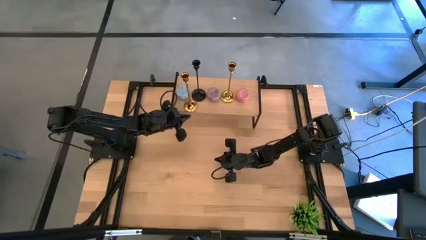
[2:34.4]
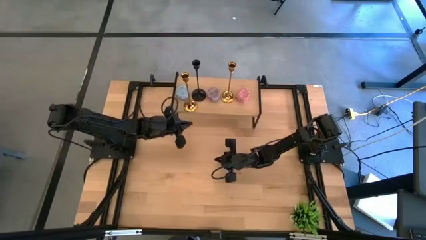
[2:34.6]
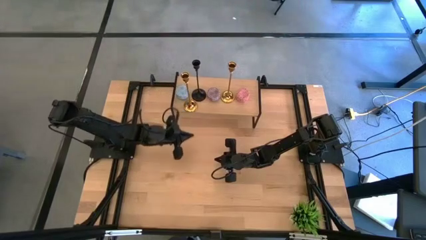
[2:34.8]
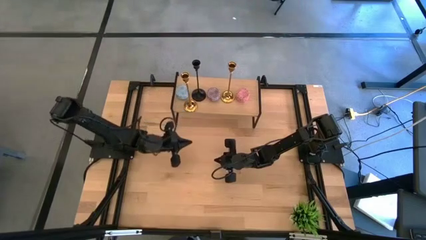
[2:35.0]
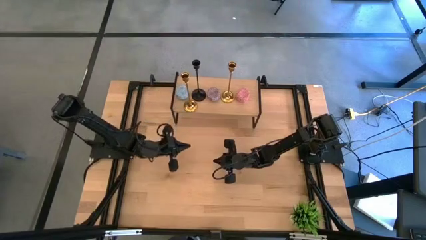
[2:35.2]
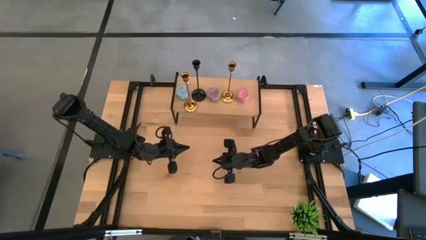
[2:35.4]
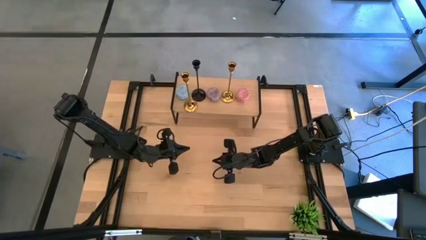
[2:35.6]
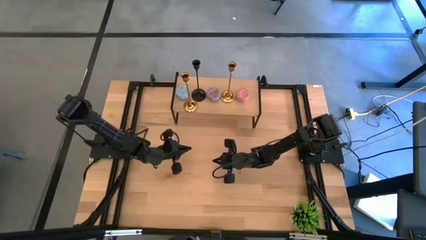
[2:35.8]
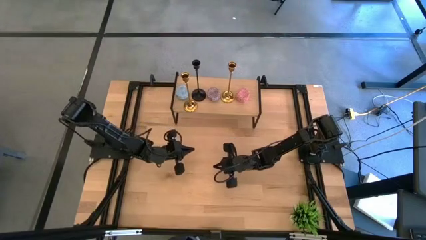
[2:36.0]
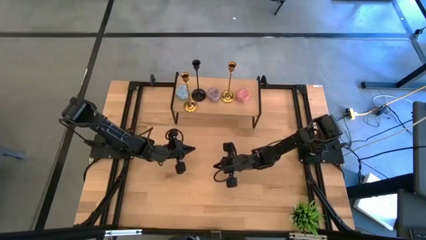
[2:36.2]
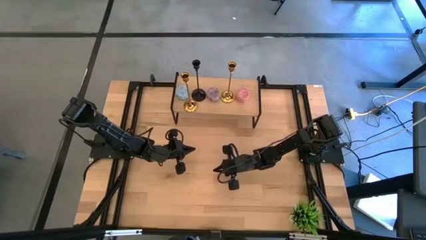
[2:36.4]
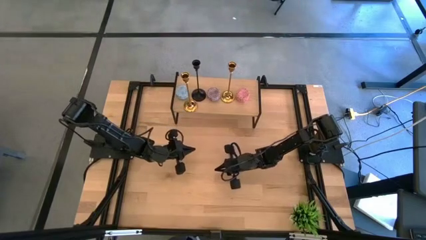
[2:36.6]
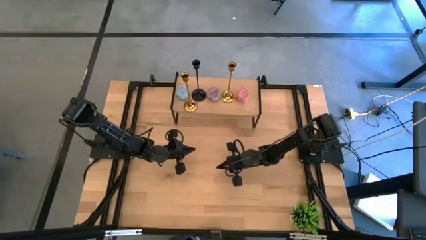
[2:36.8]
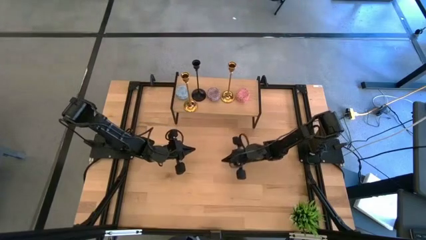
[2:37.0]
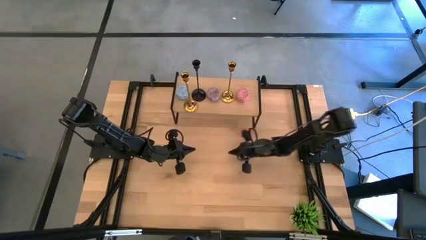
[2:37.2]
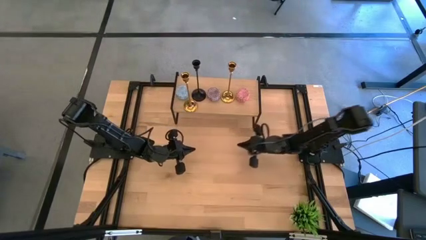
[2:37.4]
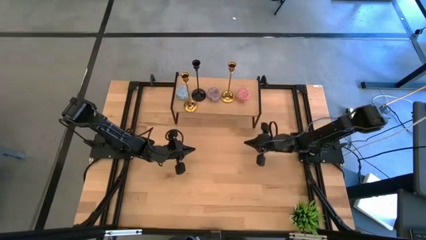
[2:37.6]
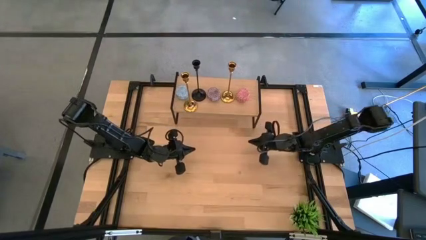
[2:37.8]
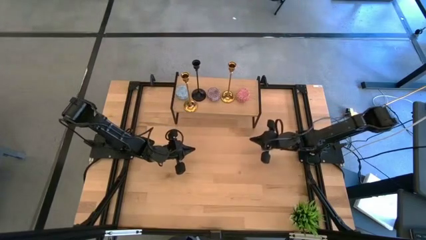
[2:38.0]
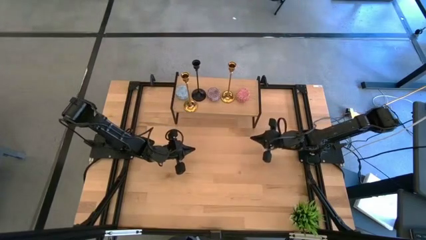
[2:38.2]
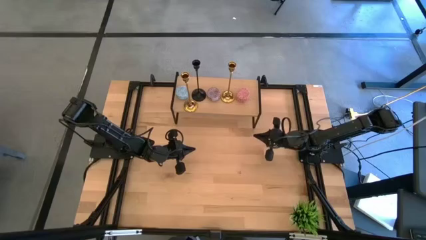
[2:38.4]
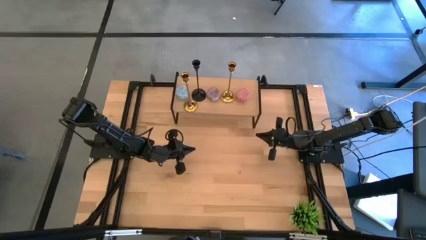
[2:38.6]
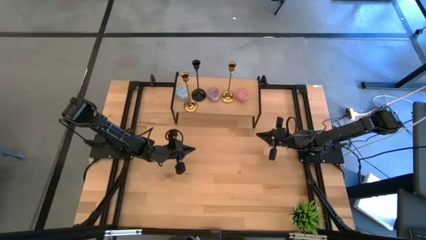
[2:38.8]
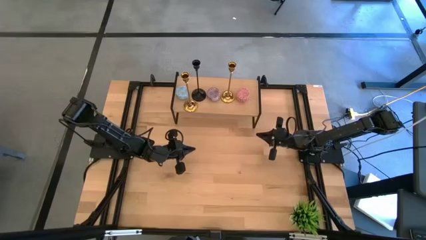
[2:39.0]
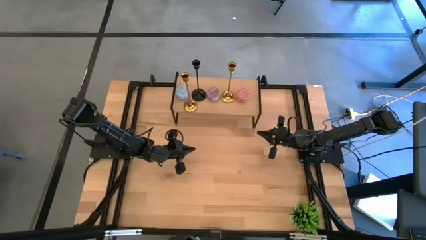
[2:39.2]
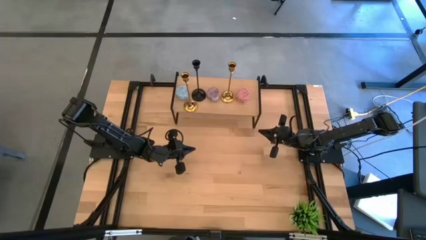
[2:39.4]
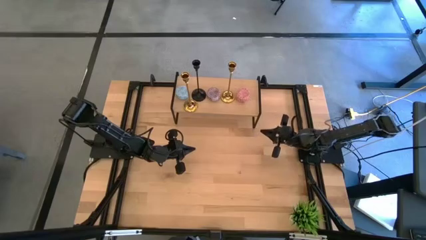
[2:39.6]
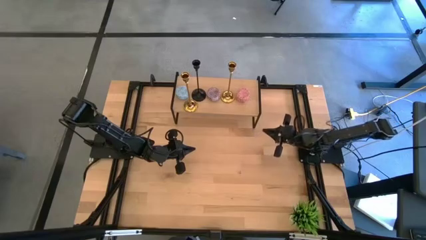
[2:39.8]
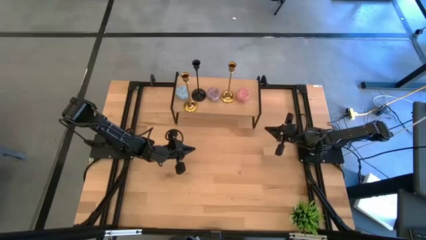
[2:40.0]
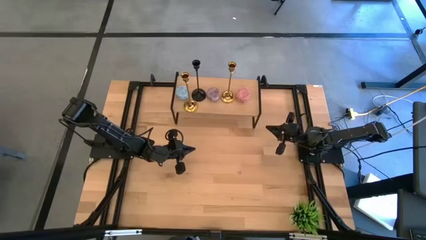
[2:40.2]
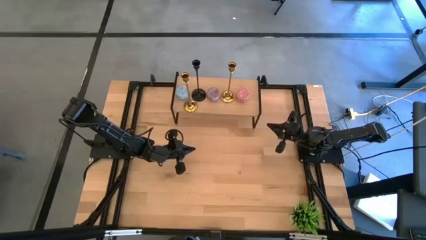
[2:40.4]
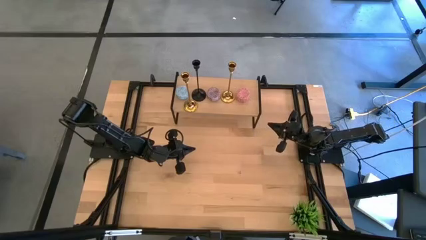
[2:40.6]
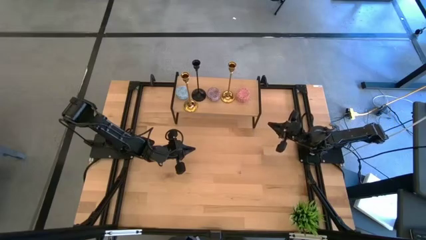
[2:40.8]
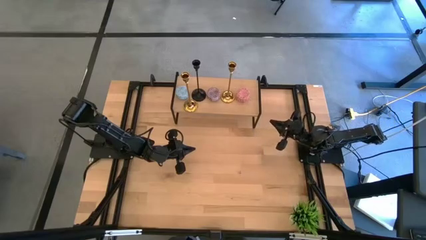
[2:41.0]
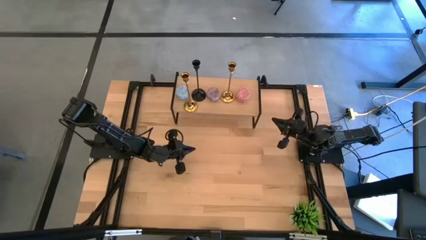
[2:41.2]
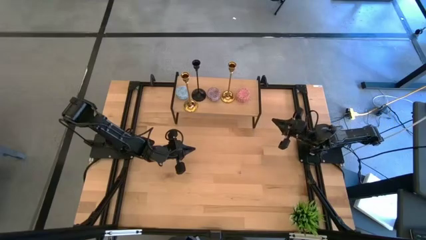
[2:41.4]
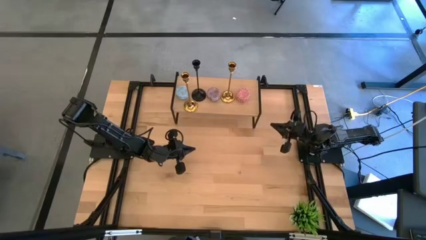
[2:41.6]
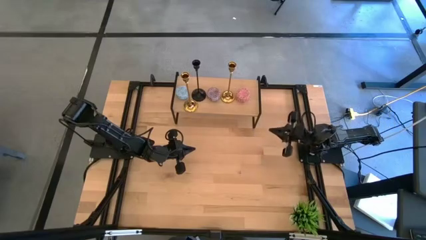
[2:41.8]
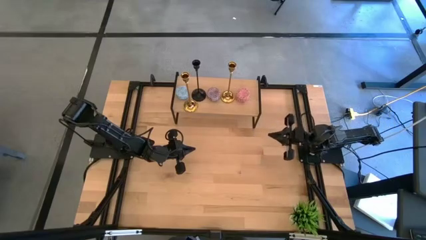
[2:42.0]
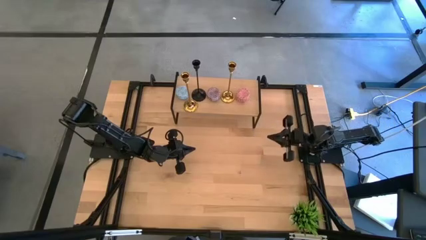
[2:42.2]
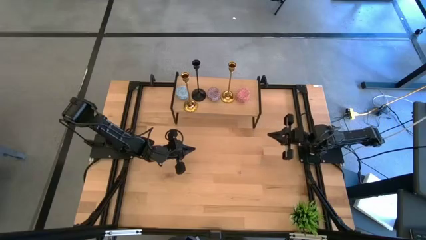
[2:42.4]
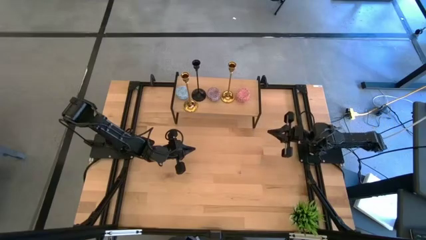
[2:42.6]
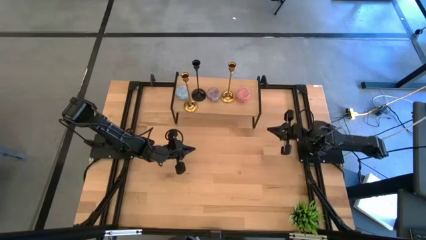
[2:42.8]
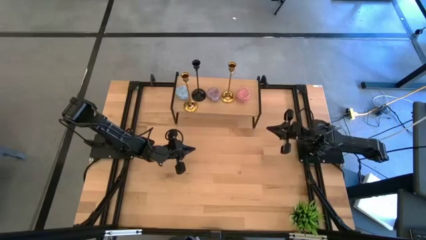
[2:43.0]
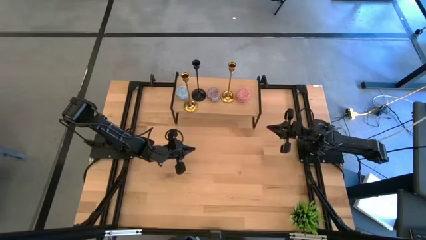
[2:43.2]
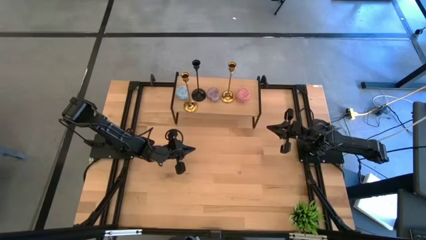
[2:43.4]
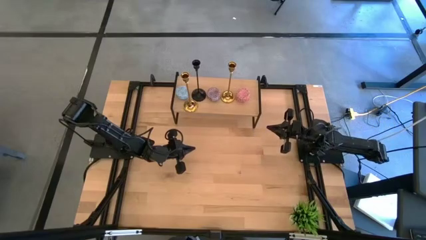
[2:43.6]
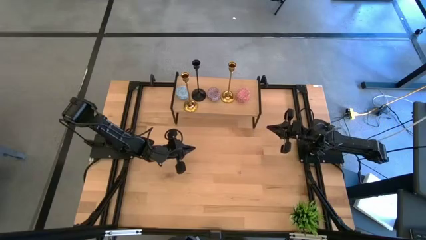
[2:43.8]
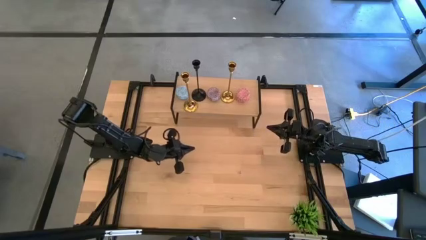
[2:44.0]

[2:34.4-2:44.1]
Task: Pick & Place candle stick holders
Return to Home Position

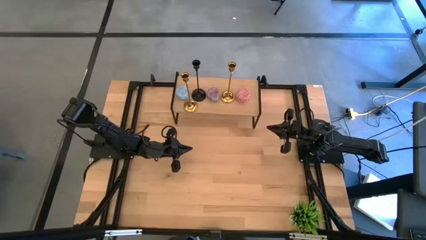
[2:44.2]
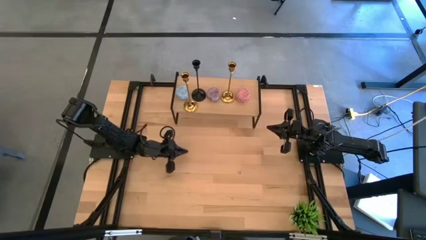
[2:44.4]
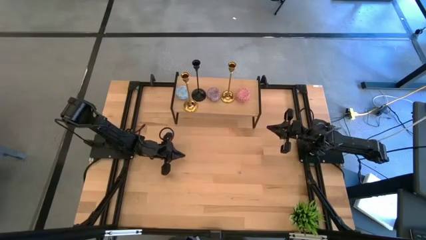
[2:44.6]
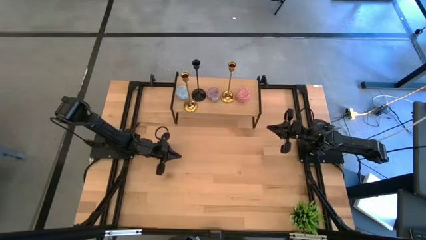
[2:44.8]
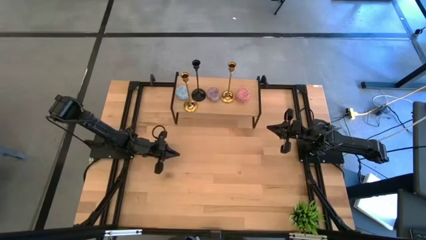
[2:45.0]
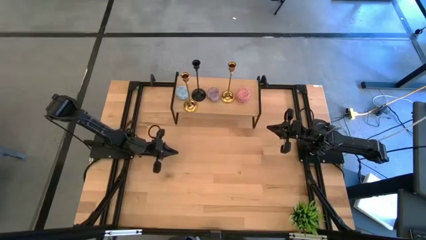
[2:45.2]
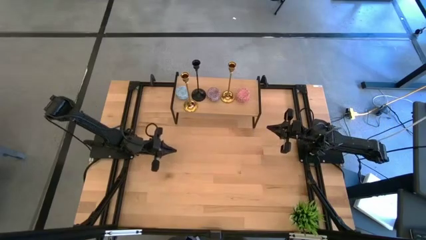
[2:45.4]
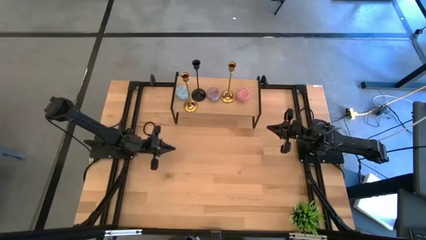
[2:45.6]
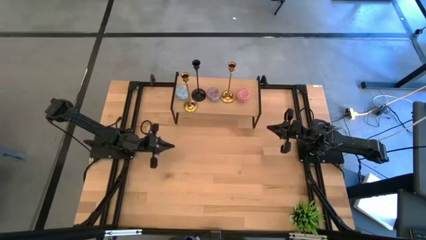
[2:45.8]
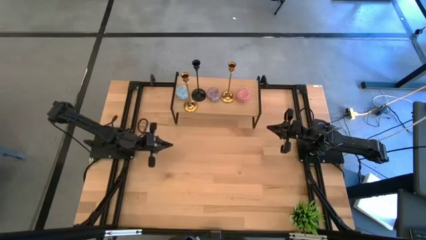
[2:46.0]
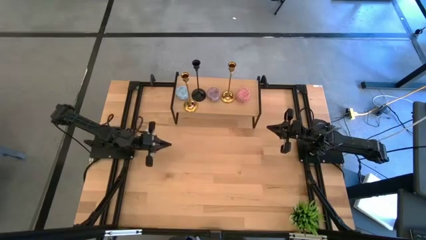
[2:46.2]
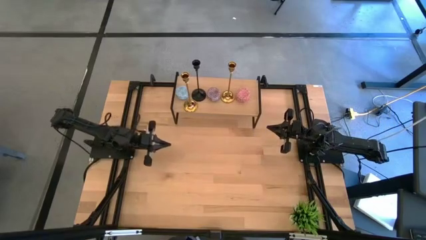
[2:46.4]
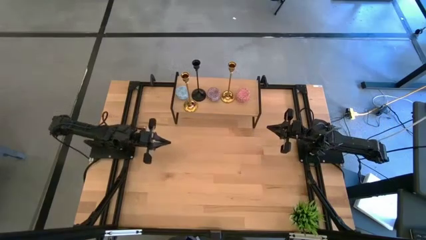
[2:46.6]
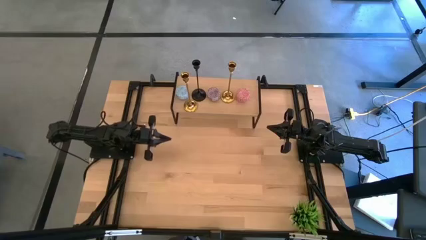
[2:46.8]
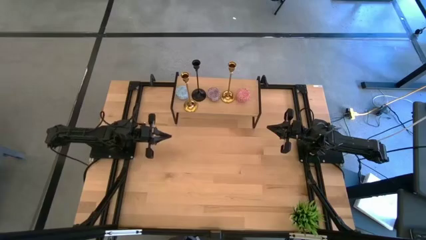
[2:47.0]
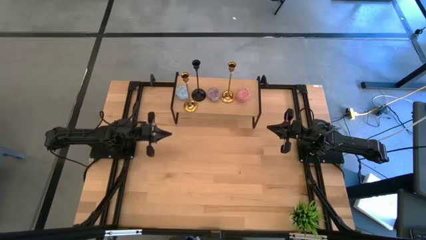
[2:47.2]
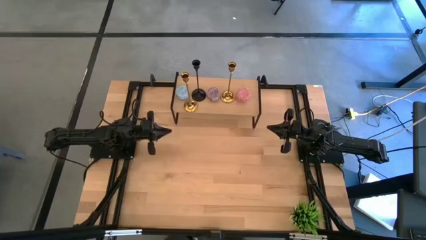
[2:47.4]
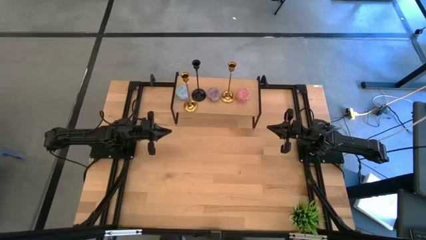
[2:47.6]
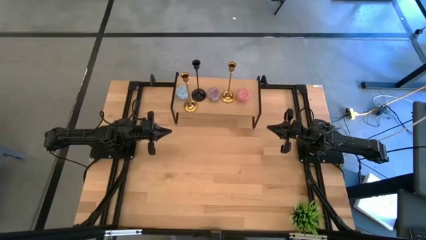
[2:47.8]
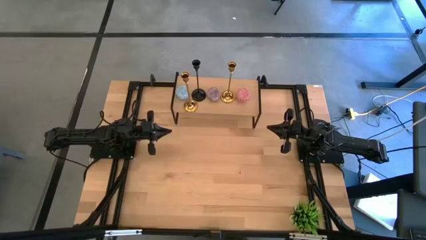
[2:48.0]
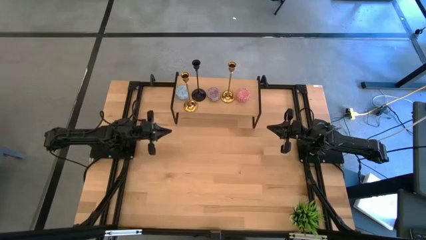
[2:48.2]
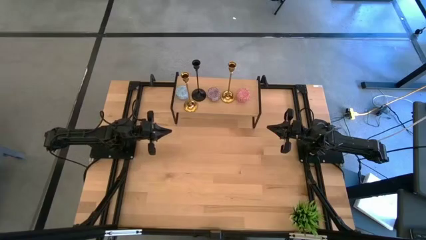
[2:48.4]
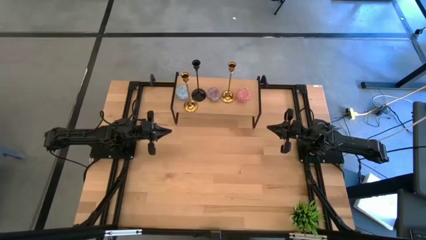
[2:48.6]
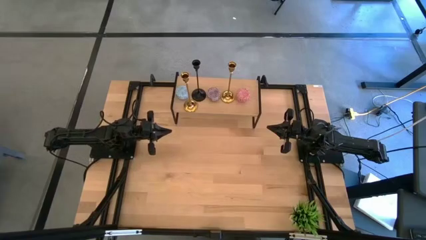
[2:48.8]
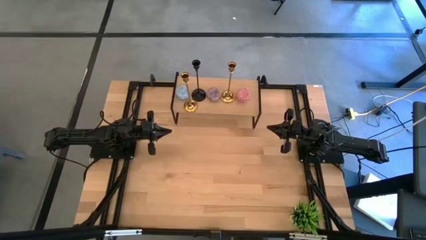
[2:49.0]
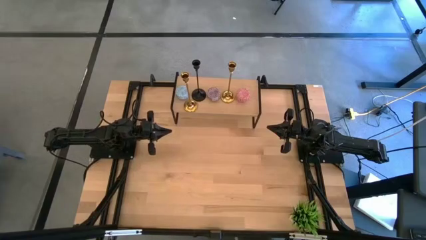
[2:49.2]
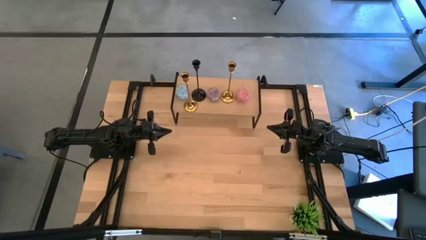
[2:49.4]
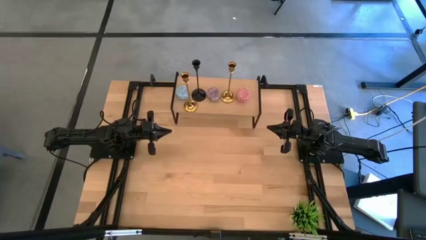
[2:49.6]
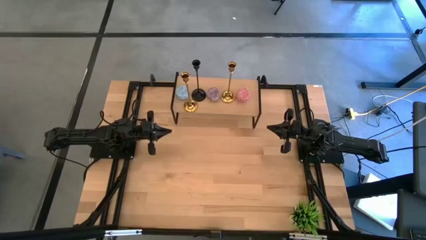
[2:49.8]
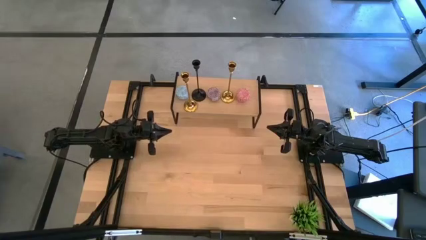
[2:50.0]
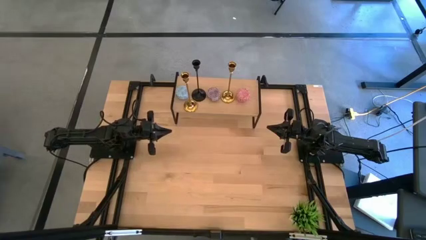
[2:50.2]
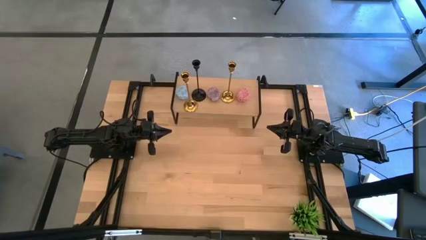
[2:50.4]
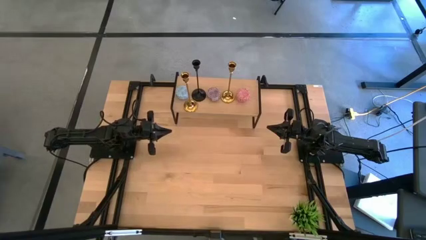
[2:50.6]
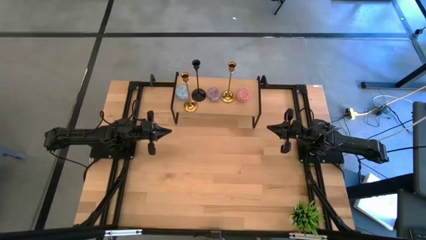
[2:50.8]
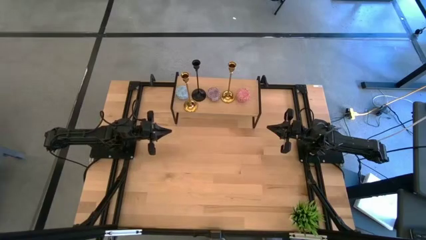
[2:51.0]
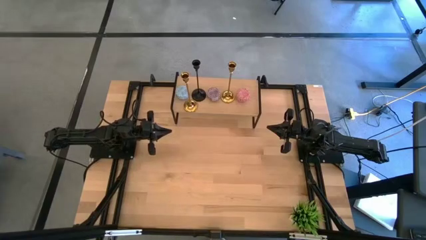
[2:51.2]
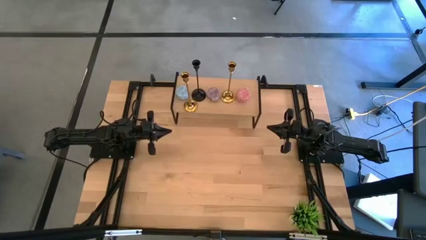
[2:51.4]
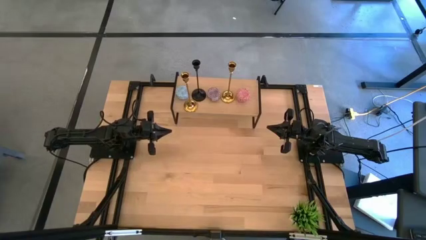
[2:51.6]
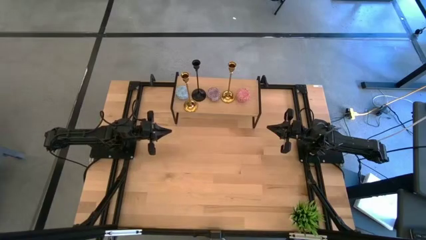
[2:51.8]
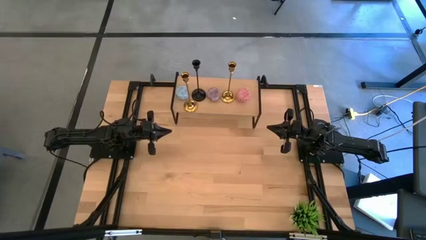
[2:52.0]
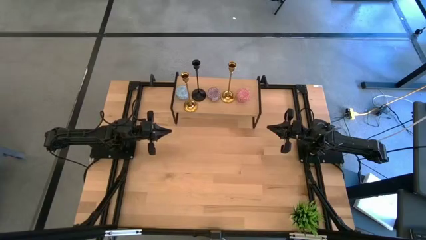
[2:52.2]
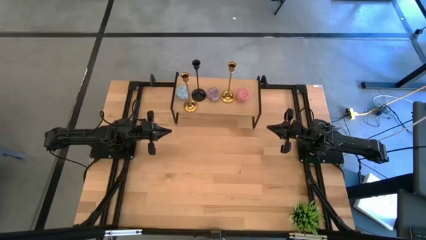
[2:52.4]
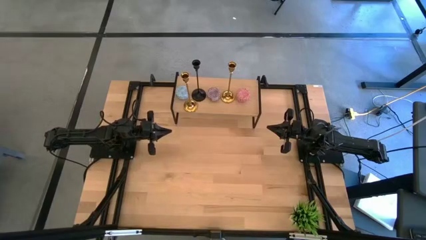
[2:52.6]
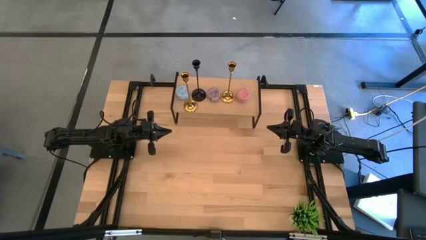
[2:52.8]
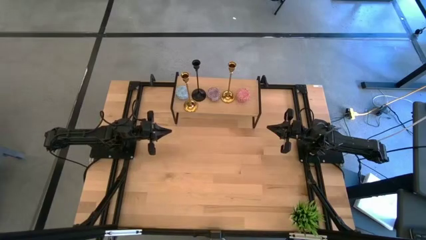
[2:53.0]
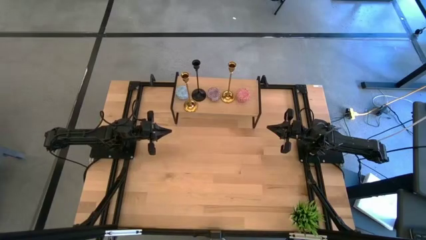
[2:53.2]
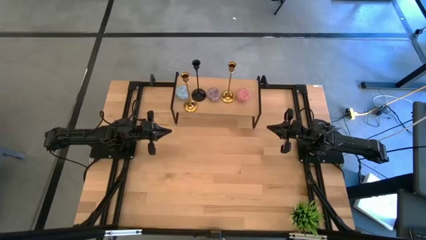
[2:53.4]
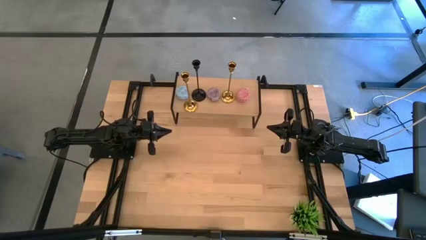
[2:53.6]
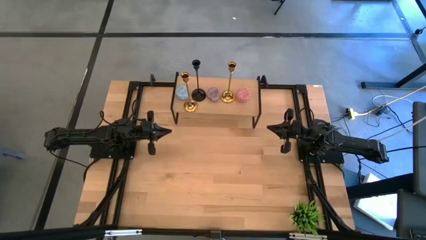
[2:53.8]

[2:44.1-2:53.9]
Return to Home Position
